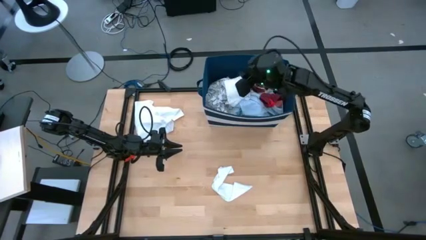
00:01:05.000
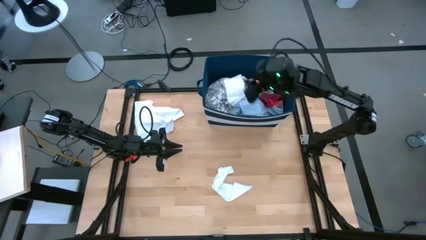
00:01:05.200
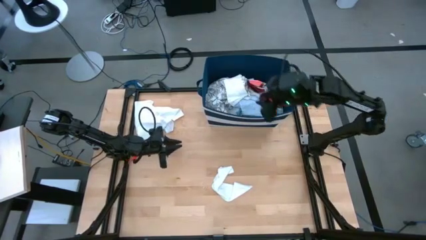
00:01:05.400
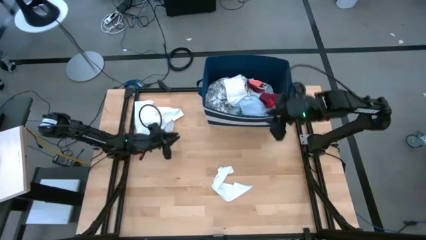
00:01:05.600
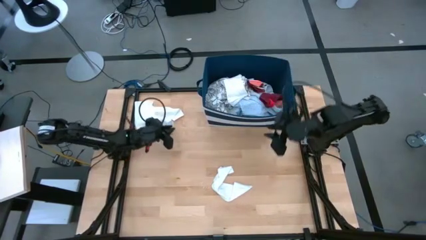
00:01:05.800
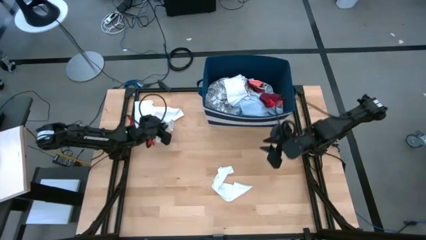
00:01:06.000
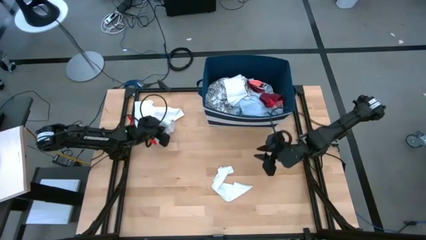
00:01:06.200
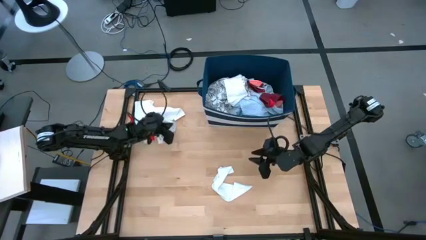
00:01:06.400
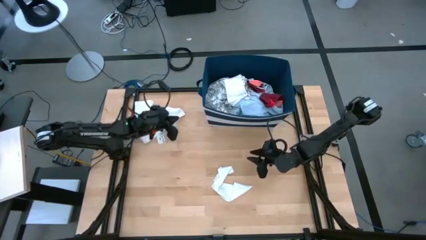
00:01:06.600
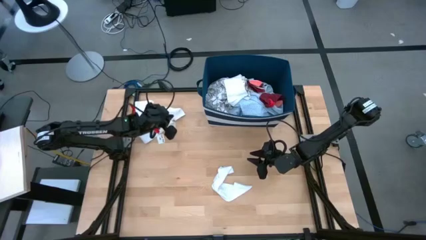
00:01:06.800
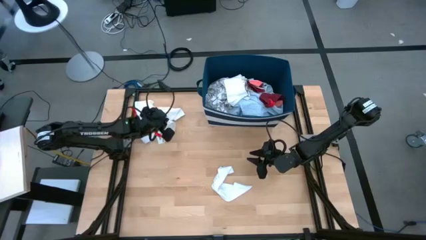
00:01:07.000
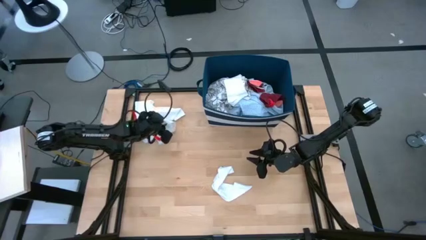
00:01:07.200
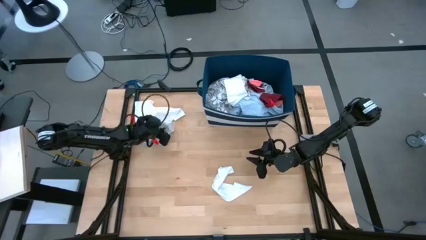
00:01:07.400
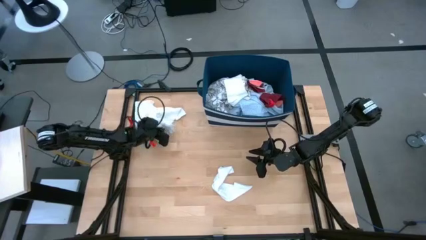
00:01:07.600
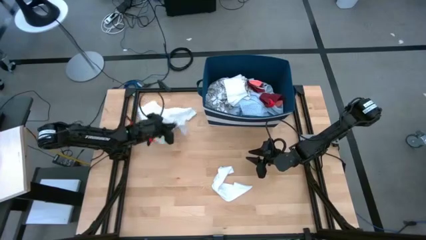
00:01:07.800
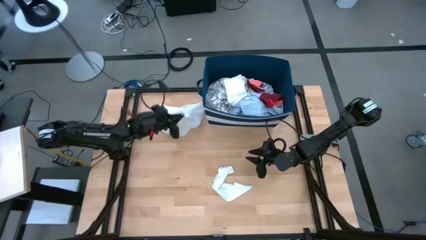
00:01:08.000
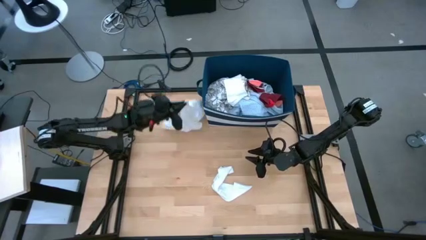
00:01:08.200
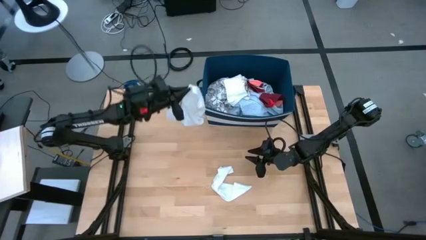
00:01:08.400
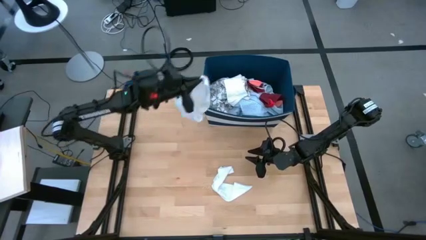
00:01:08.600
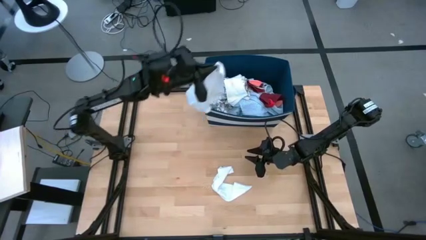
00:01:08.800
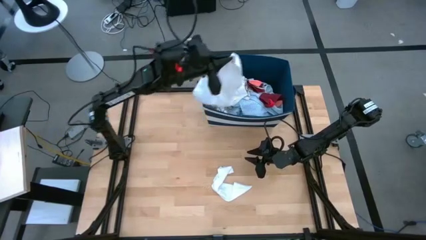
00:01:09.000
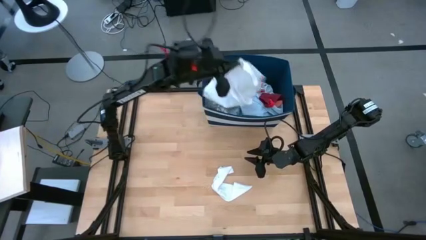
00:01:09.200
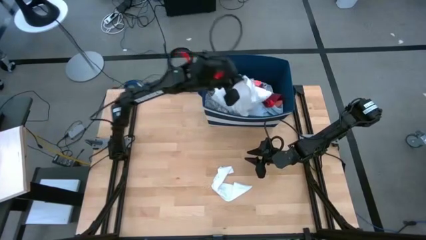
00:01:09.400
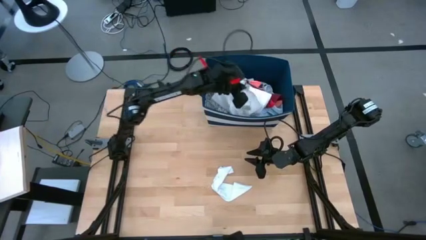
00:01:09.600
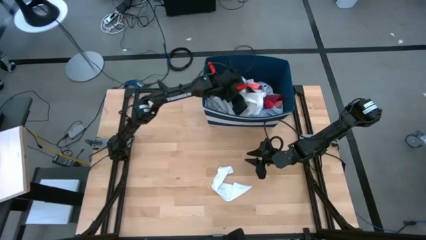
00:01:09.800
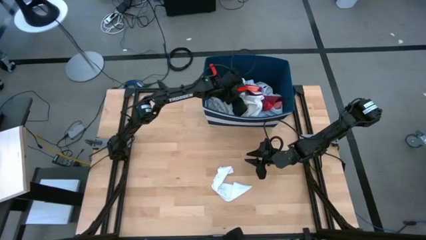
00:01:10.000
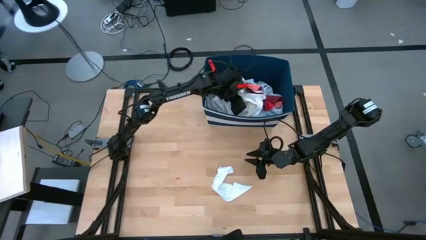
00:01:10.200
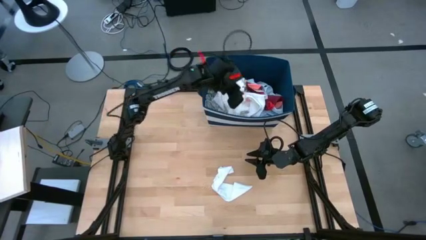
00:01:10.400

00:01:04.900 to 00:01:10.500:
Task: Sort clothes
Put the white underwear into the blue bin

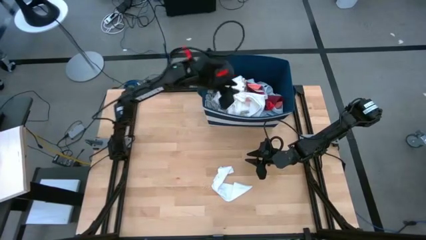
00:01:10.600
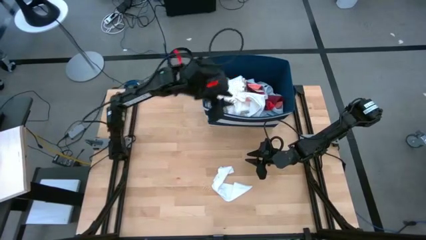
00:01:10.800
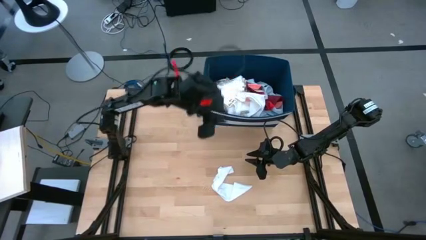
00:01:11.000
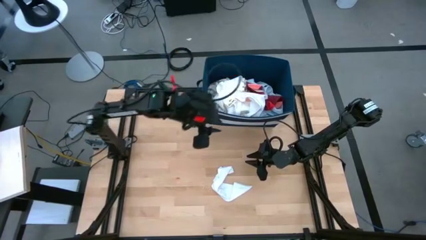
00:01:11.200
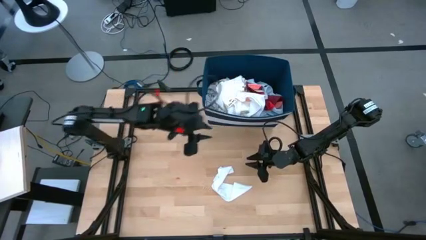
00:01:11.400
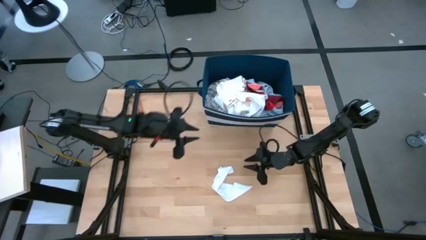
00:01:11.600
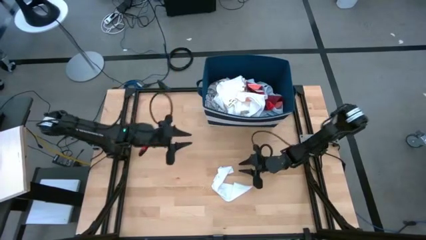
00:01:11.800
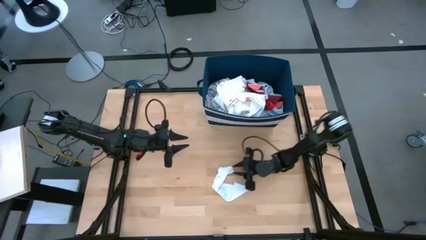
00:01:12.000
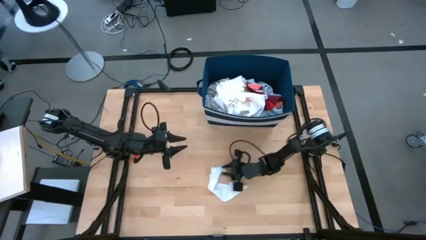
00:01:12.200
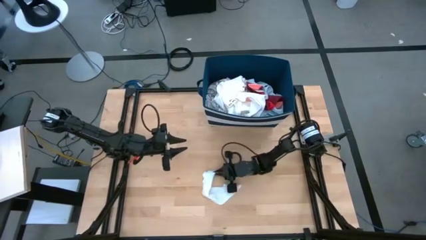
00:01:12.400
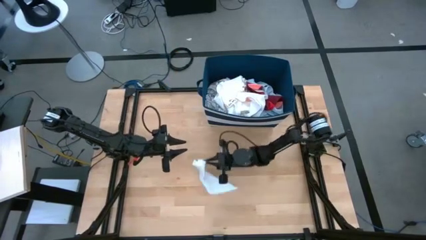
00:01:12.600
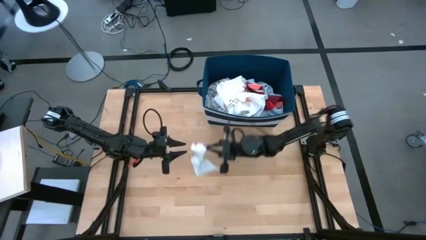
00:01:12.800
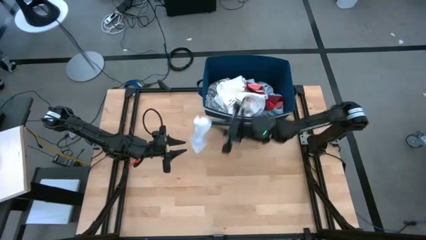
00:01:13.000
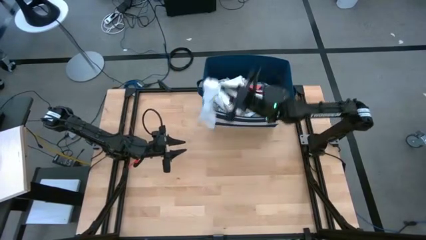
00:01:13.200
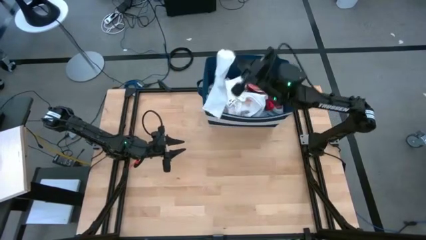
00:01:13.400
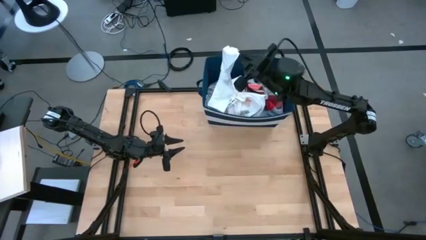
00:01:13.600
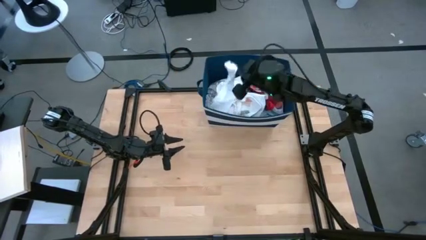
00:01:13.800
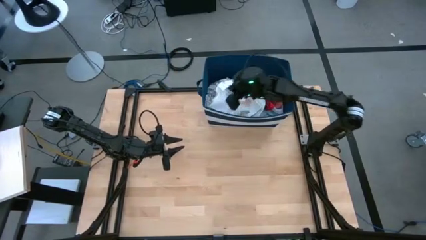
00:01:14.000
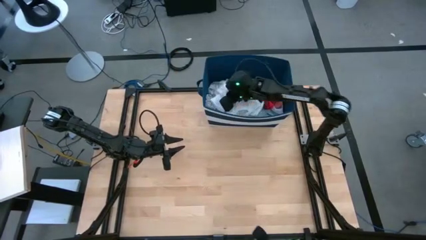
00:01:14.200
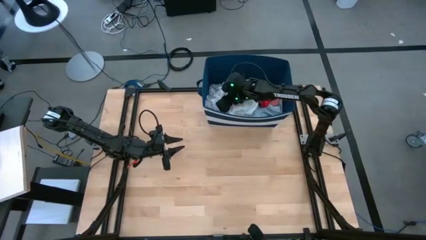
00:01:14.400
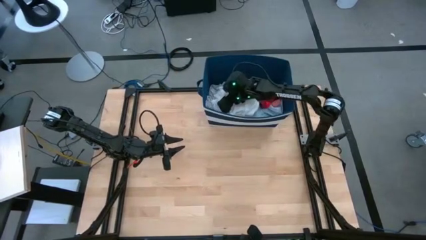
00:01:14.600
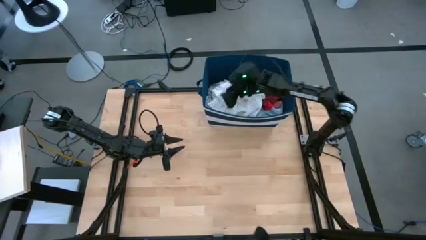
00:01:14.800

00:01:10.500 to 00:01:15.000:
Put the white socks into the blue bin
